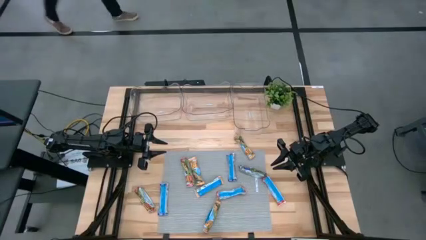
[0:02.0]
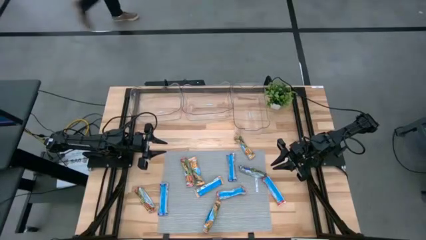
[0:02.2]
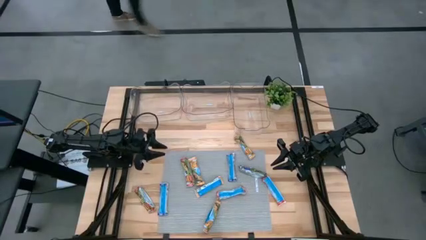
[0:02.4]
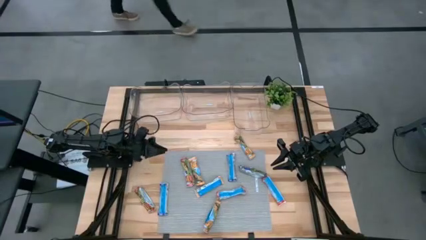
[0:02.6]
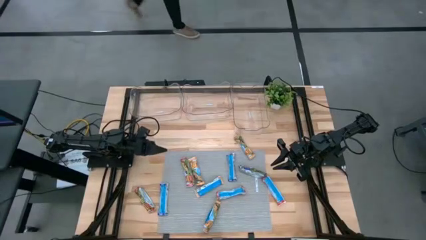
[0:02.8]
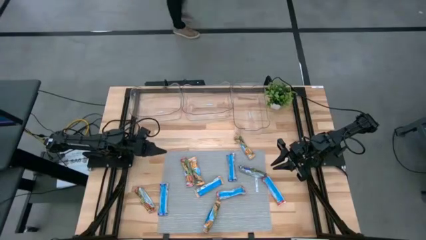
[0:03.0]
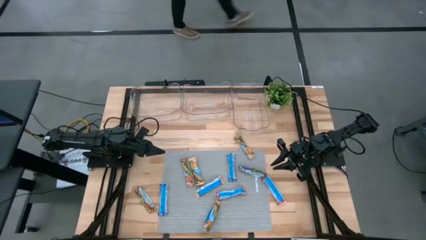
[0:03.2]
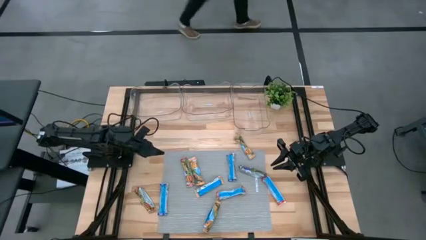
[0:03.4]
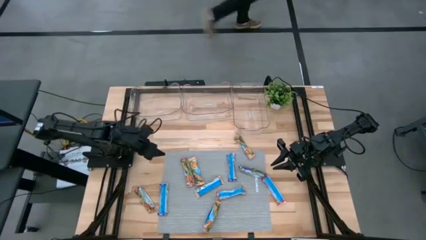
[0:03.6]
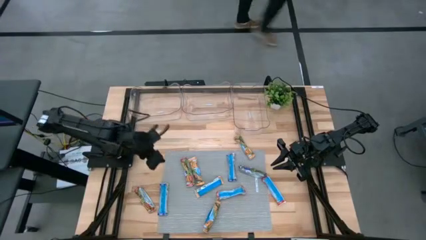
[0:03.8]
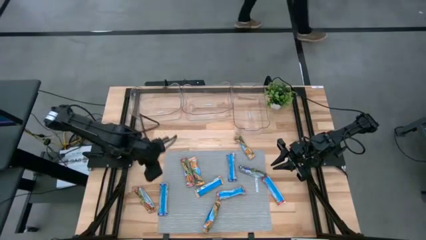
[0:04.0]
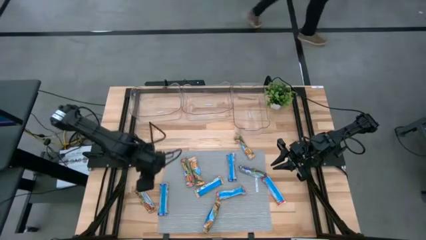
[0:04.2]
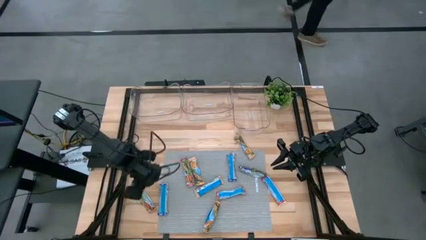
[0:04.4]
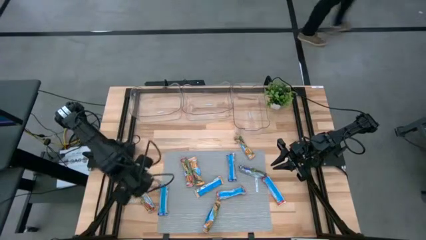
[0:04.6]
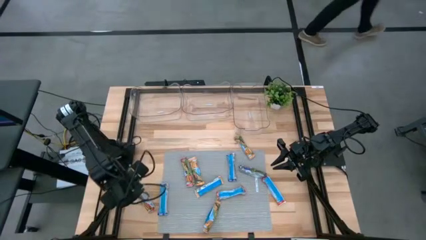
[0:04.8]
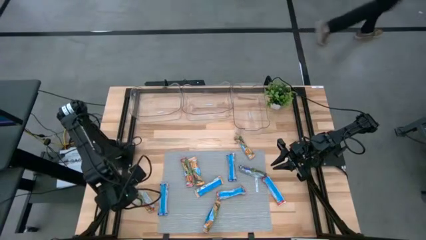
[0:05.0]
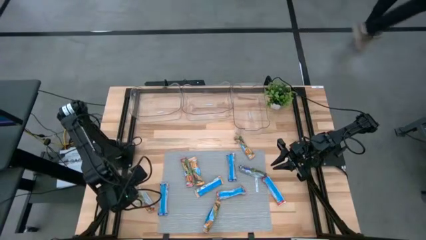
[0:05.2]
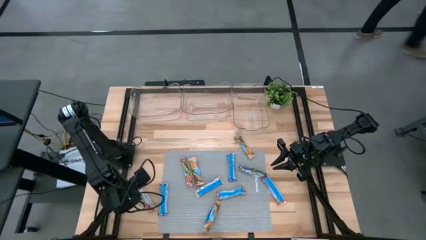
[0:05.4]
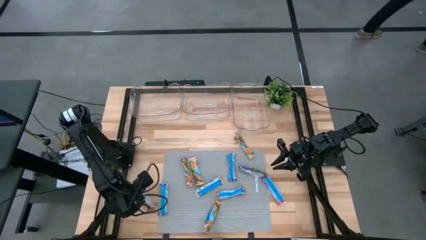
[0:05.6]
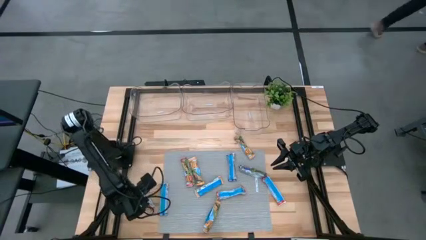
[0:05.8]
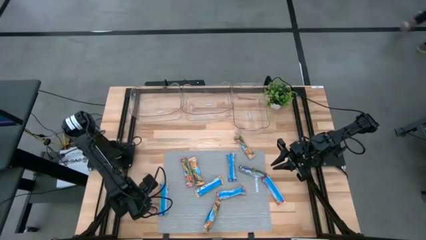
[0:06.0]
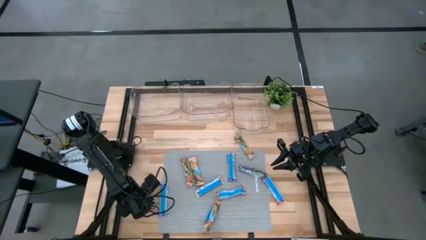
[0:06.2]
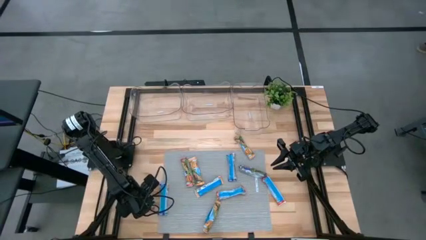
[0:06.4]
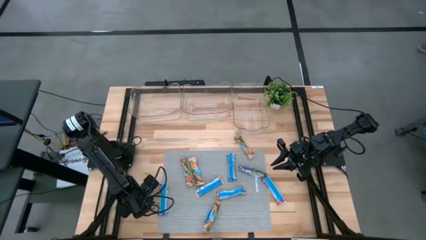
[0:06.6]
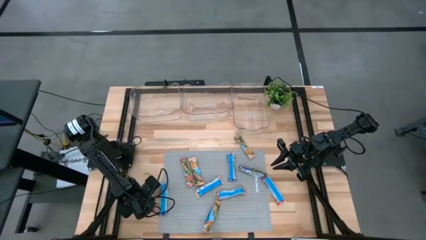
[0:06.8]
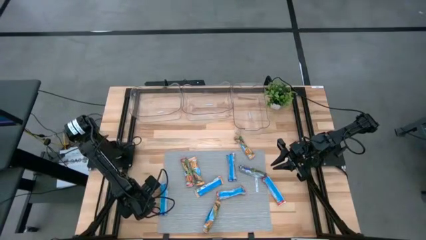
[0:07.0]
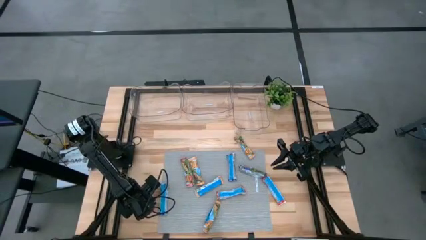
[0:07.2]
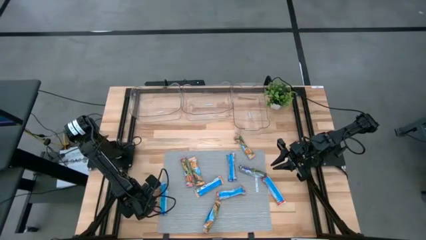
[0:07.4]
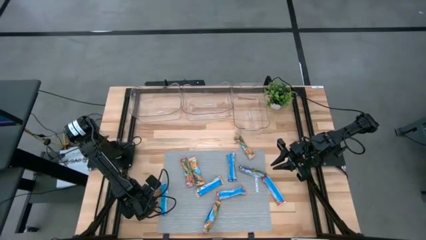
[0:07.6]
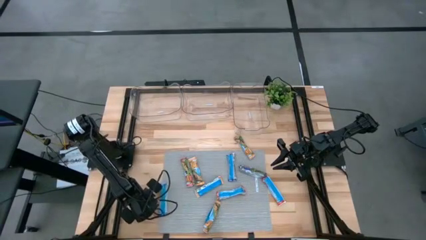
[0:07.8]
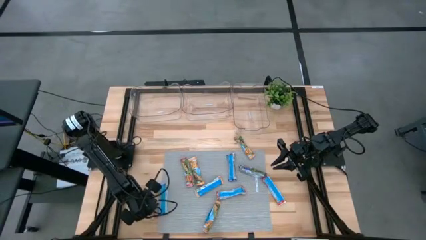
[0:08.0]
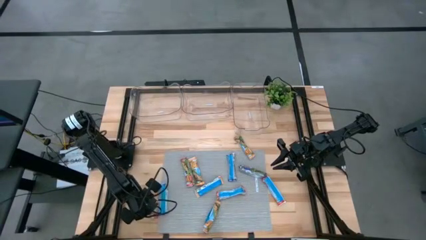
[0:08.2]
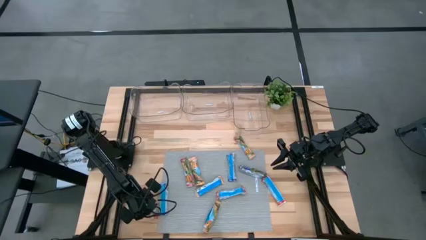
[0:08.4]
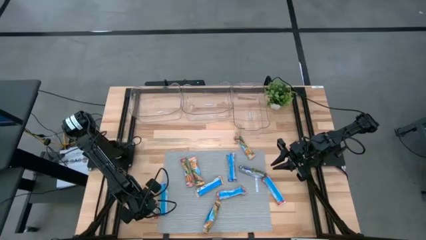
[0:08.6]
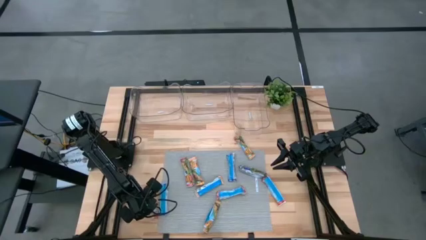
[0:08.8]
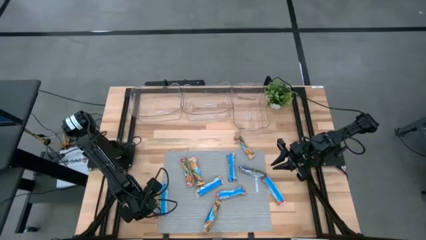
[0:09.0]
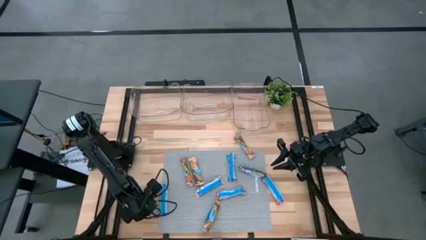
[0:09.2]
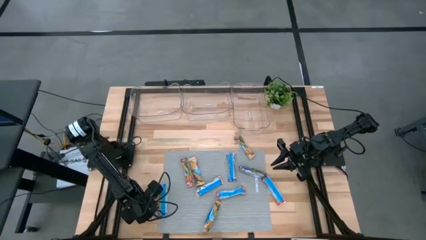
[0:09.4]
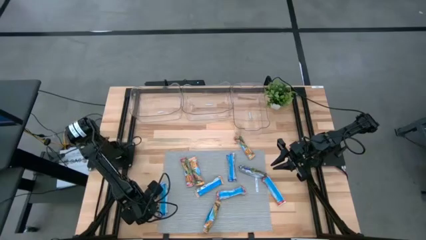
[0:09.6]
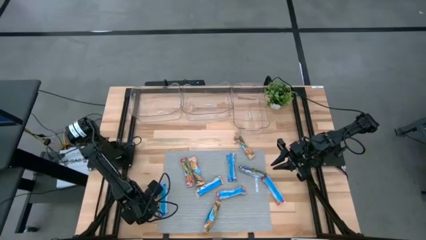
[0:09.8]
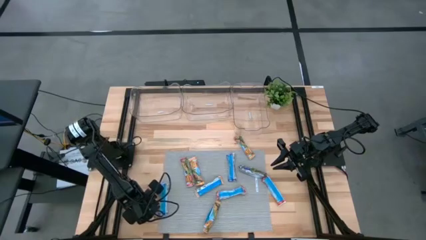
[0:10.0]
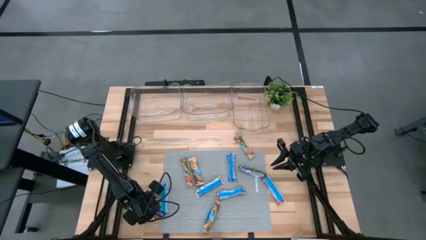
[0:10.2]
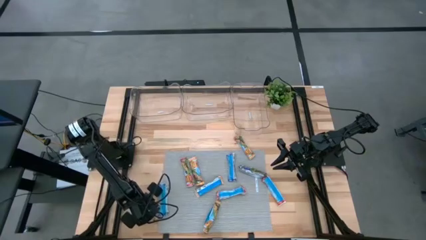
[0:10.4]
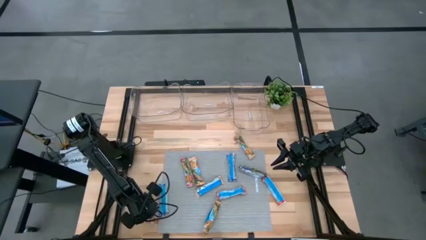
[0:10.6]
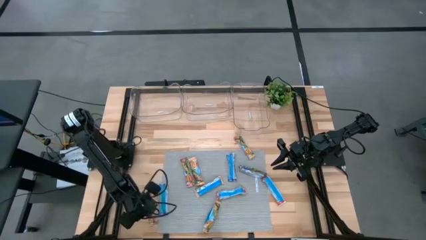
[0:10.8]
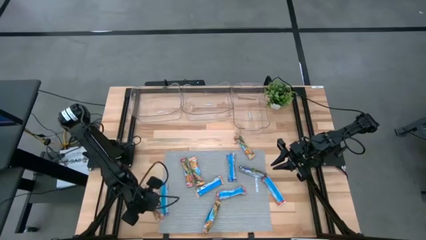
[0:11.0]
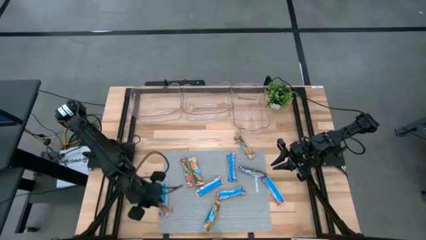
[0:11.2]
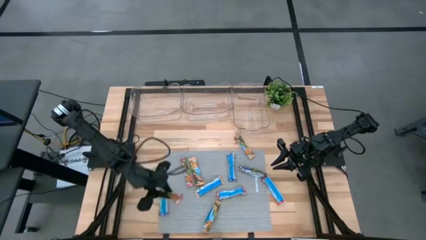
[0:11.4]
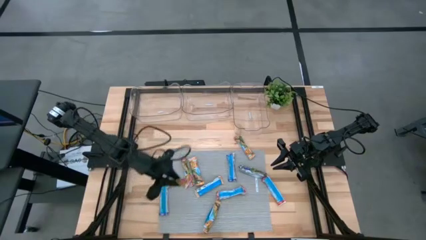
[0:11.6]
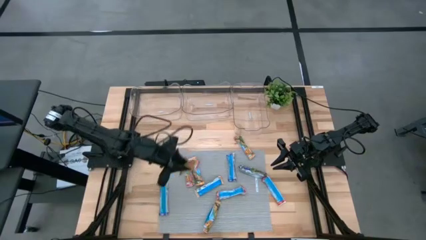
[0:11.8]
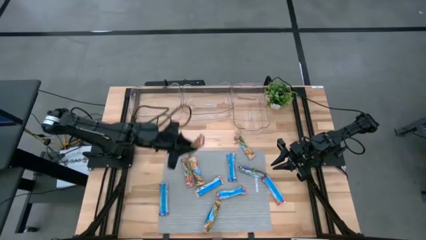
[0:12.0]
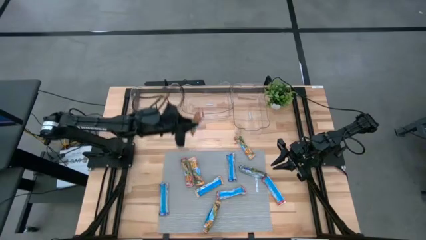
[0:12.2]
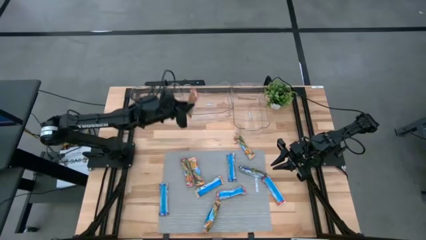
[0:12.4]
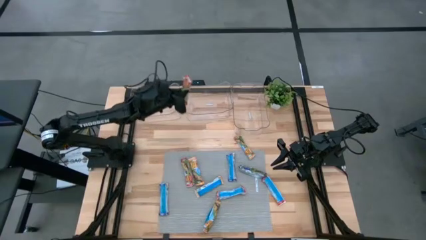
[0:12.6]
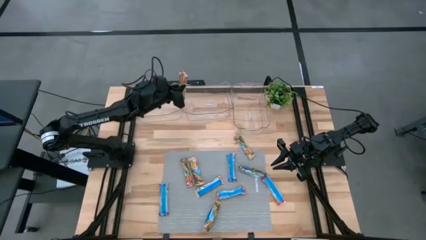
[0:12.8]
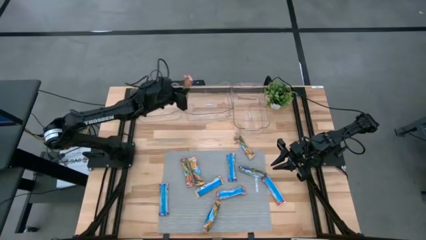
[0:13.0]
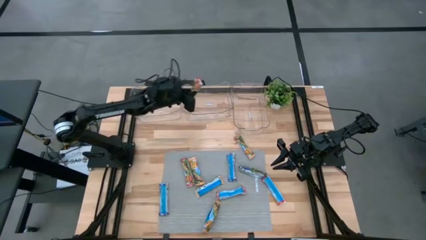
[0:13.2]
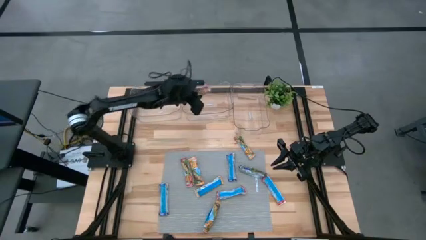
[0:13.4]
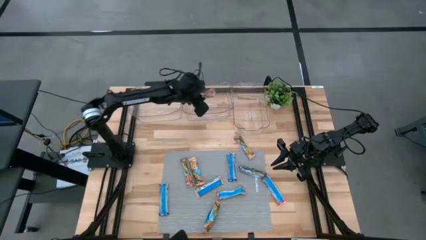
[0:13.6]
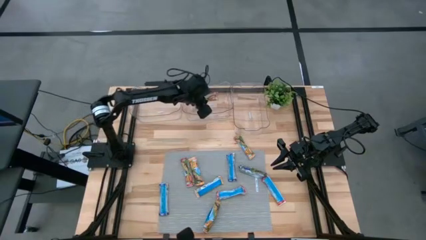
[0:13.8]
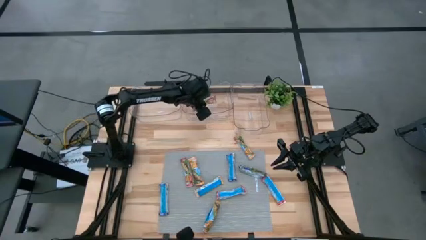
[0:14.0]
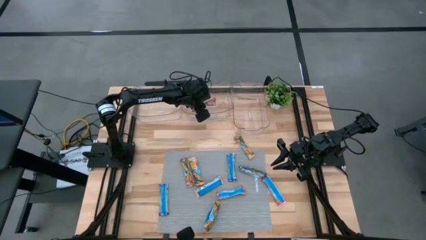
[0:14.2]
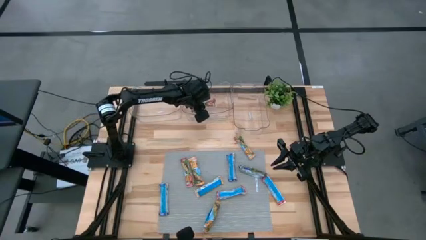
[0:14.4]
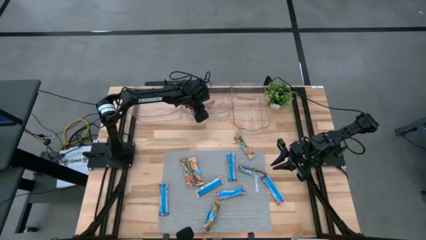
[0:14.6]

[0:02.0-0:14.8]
Task: Pick and place Granola Bars by type
Put the red granola bar into the middle transparent bin
